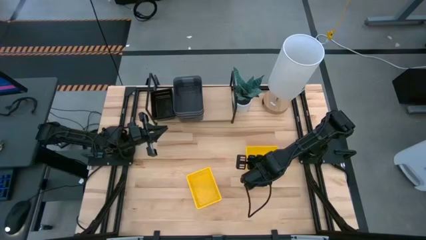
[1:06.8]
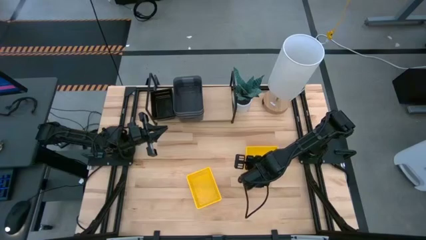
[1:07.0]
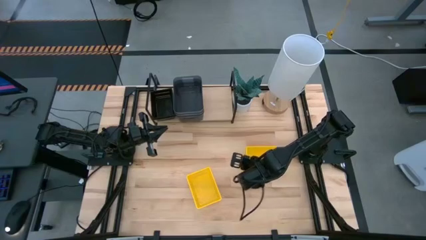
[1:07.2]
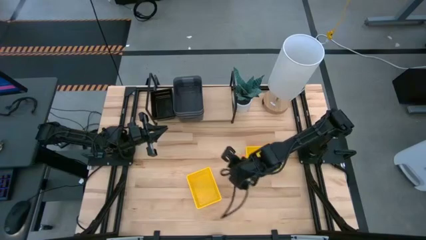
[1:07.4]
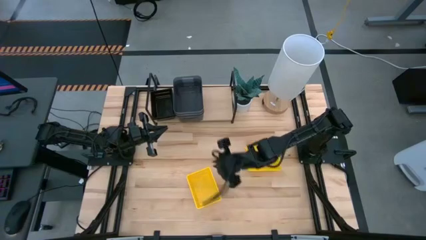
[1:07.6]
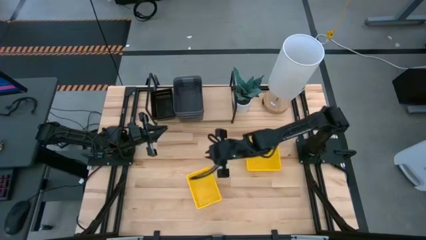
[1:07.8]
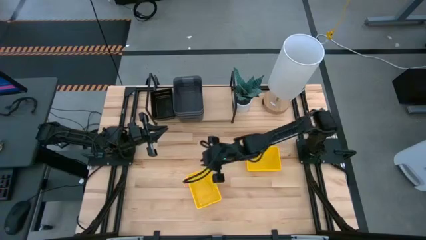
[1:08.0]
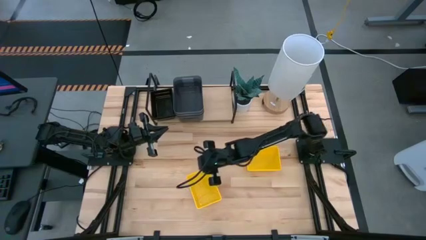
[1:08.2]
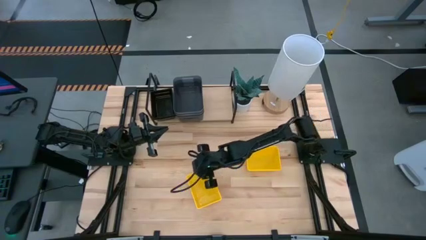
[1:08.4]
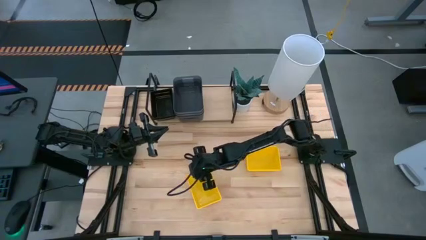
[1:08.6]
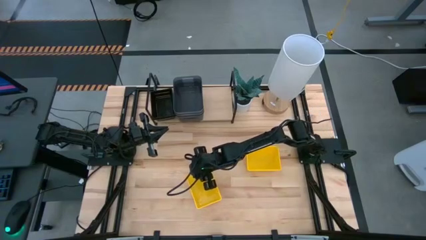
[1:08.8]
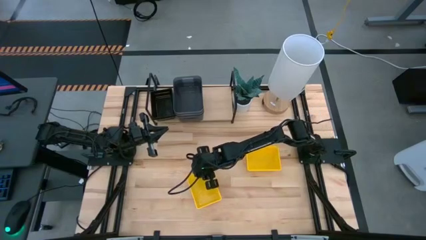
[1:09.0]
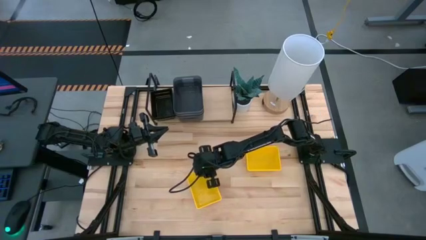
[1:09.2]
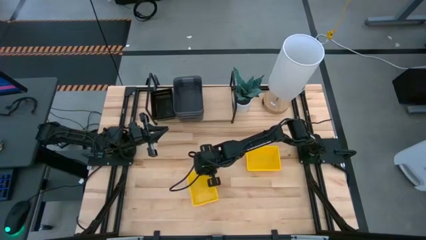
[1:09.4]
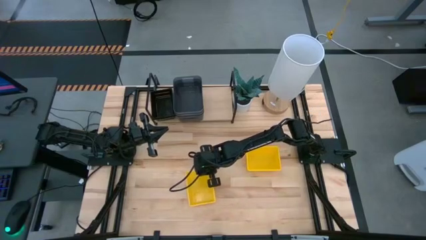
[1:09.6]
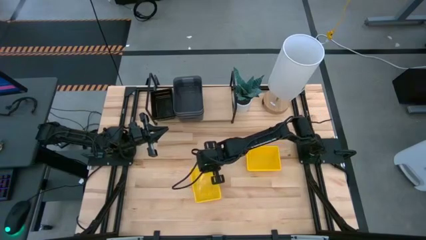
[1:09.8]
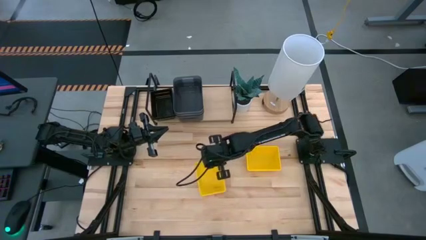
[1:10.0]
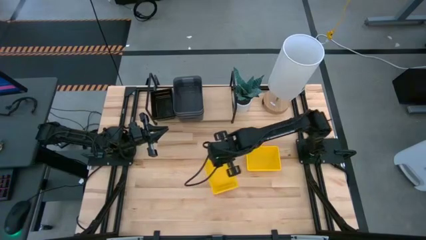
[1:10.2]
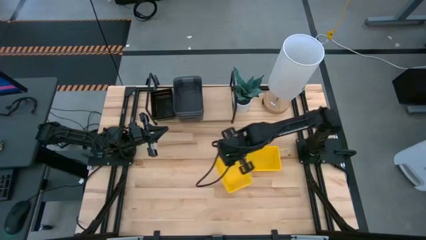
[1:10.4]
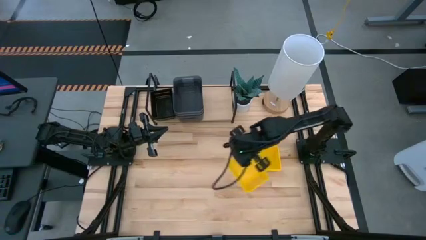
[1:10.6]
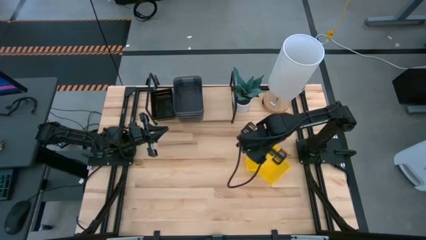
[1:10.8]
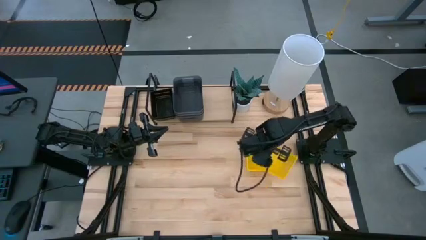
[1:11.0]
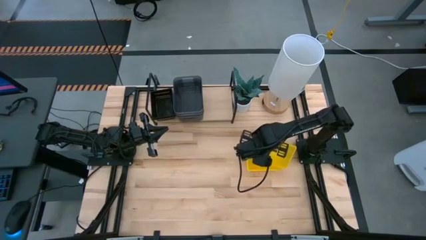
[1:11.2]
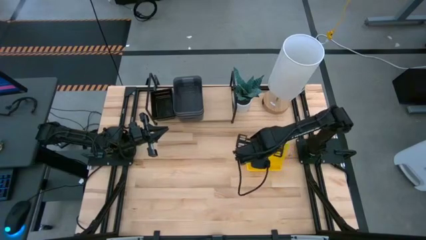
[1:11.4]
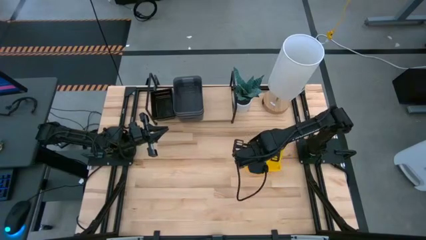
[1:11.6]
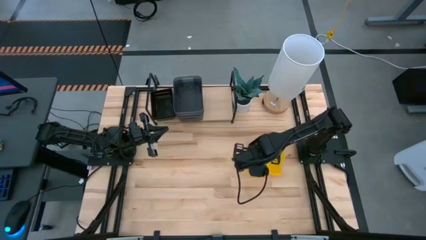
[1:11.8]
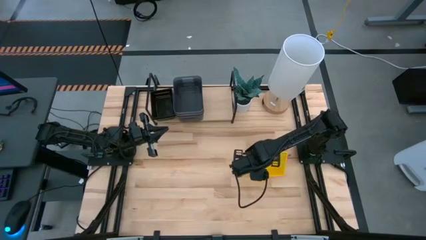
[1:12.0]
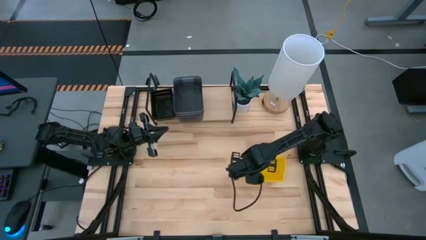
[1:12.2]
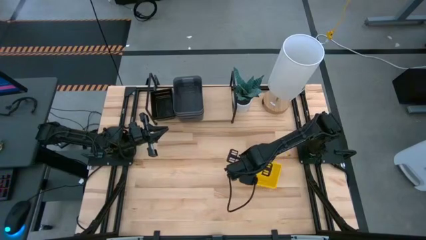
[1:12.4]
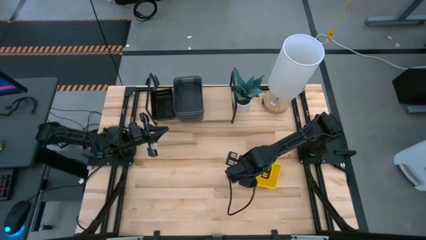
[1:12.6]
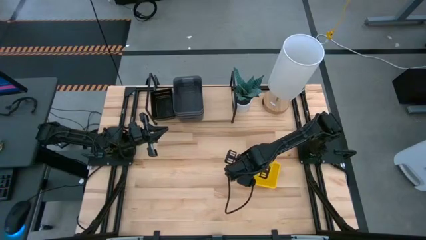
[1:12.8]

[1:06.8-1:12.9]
Task: Stack baskets on shelf by color
Stack the bottom yellow bin on the stacked yellow bins

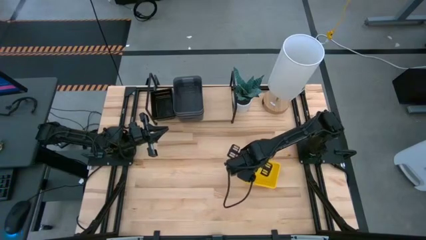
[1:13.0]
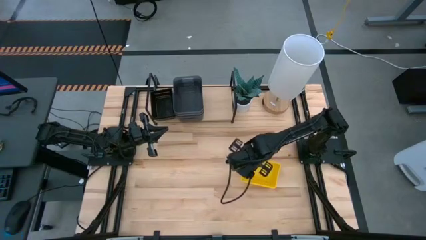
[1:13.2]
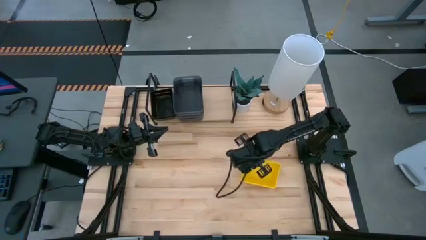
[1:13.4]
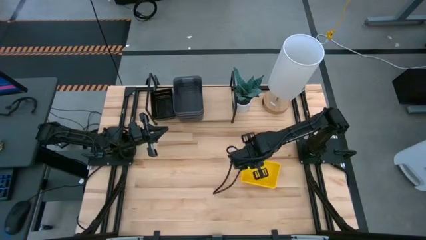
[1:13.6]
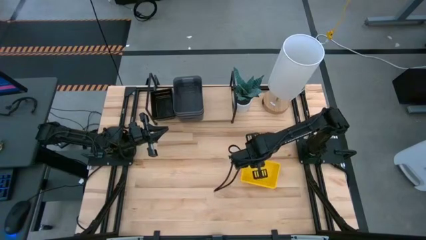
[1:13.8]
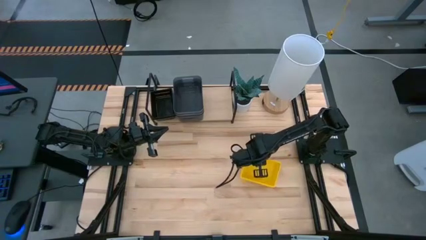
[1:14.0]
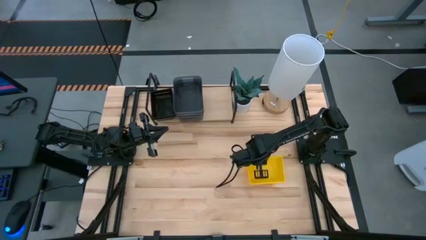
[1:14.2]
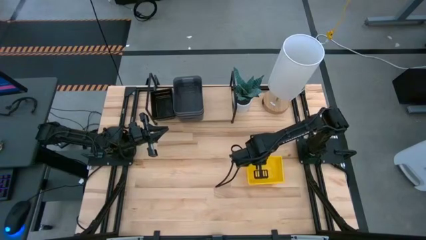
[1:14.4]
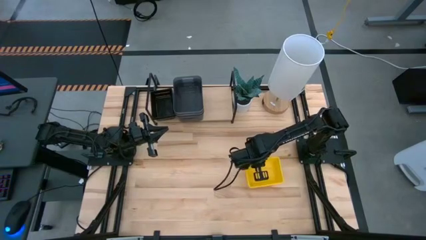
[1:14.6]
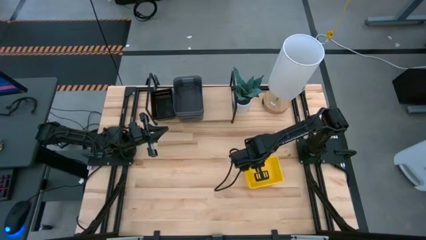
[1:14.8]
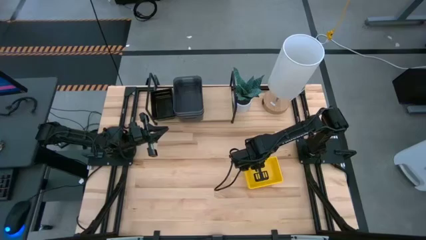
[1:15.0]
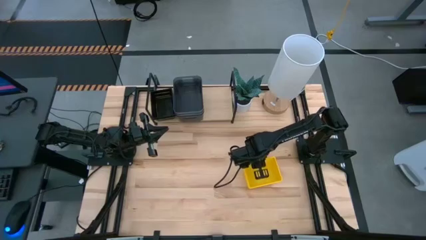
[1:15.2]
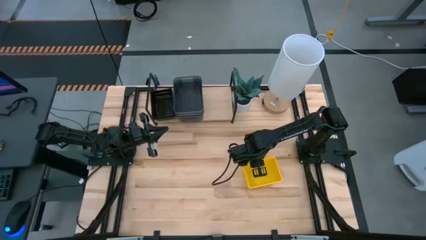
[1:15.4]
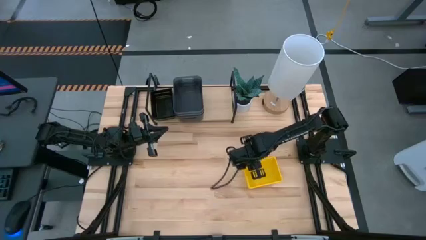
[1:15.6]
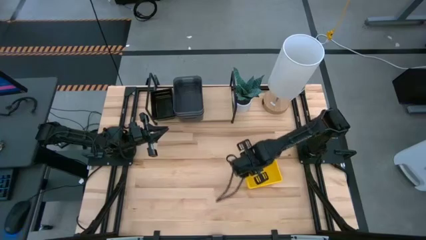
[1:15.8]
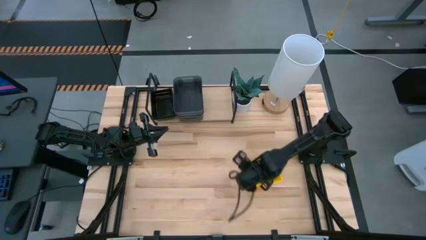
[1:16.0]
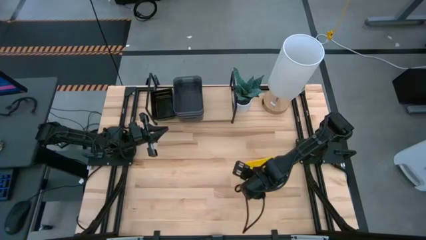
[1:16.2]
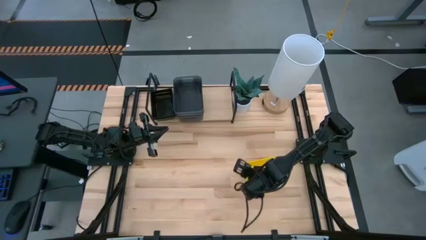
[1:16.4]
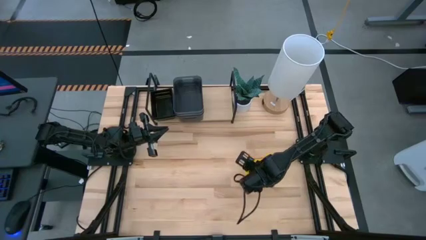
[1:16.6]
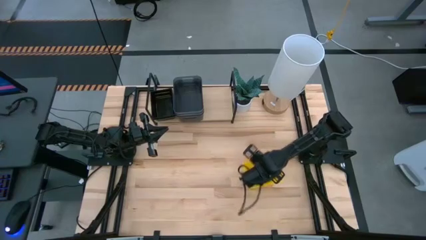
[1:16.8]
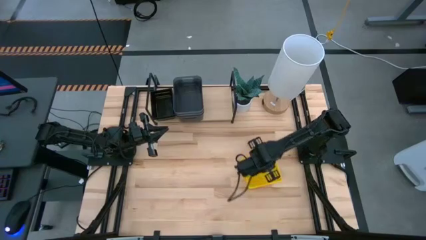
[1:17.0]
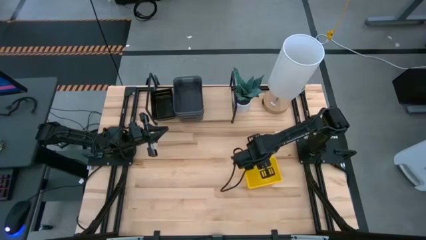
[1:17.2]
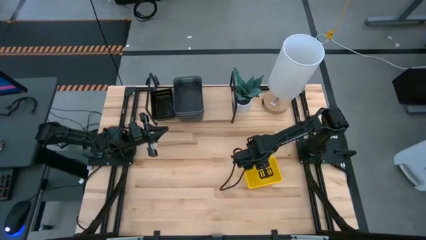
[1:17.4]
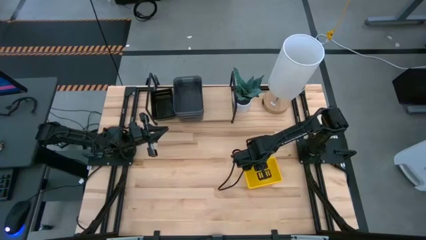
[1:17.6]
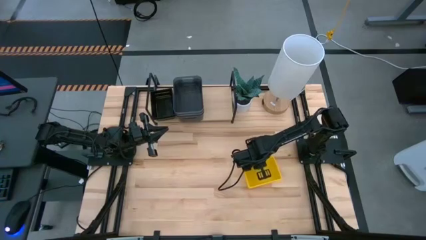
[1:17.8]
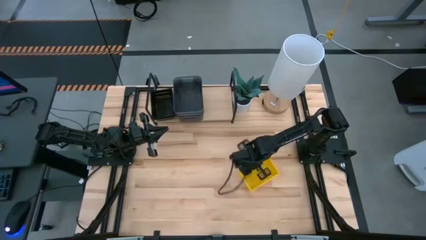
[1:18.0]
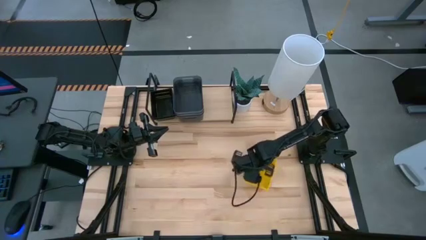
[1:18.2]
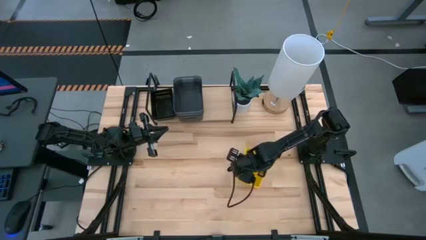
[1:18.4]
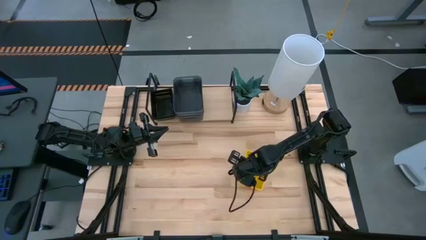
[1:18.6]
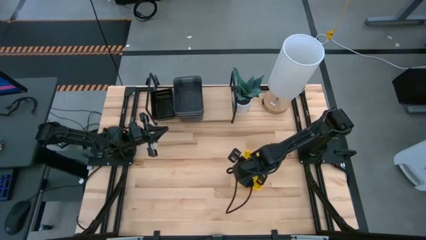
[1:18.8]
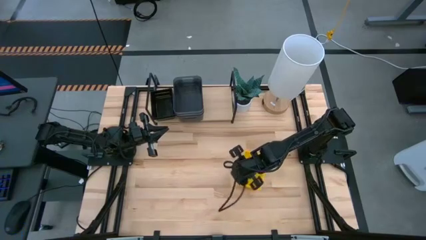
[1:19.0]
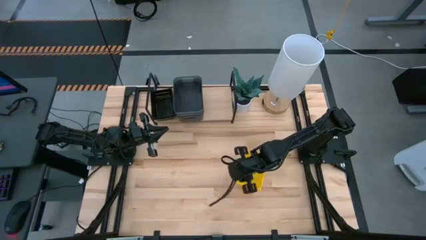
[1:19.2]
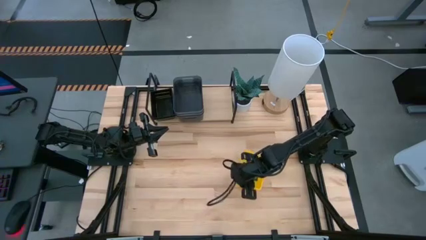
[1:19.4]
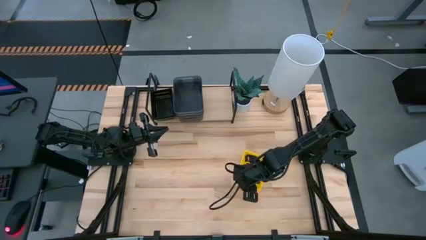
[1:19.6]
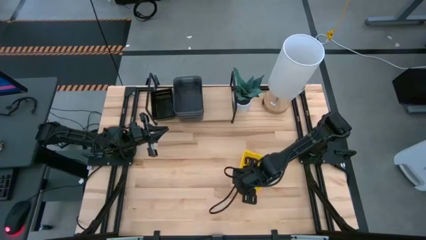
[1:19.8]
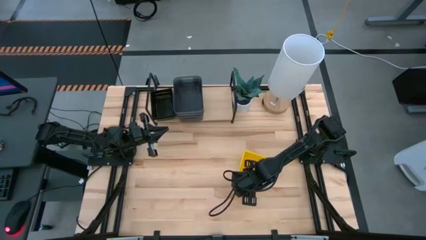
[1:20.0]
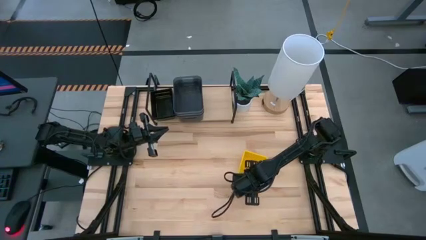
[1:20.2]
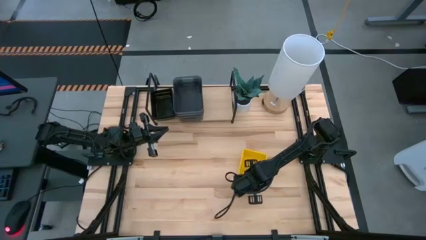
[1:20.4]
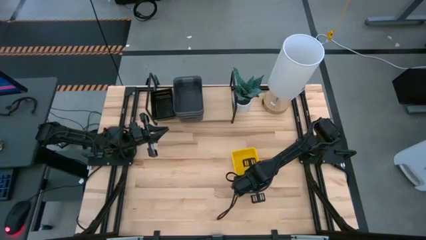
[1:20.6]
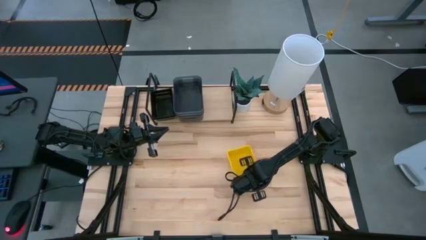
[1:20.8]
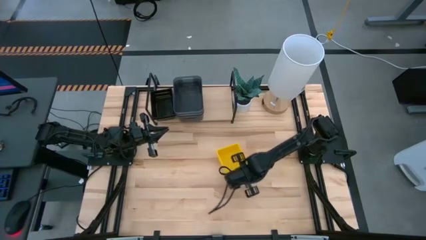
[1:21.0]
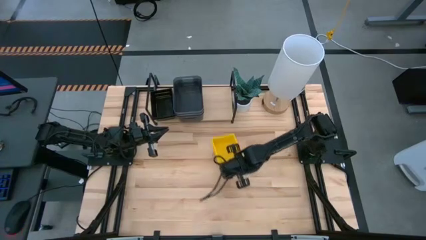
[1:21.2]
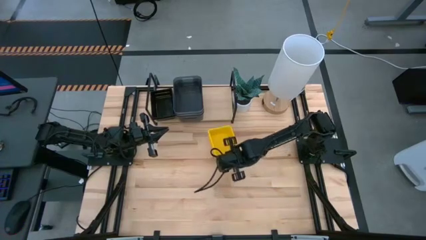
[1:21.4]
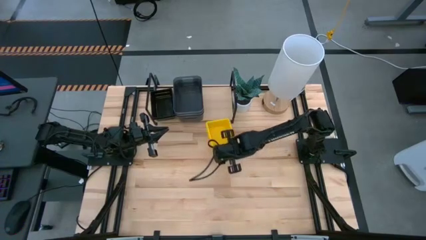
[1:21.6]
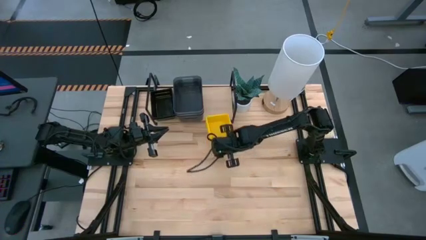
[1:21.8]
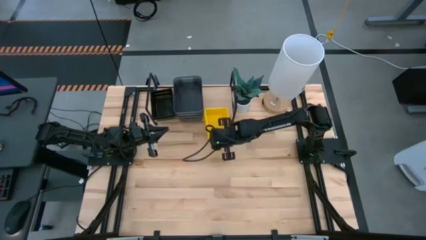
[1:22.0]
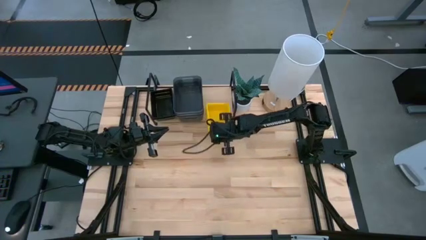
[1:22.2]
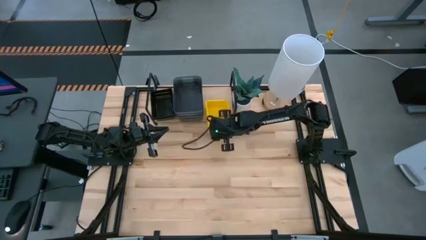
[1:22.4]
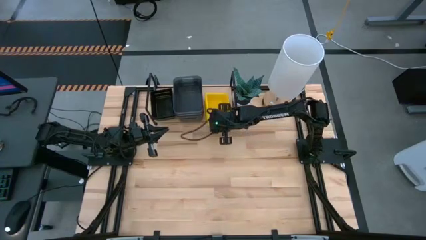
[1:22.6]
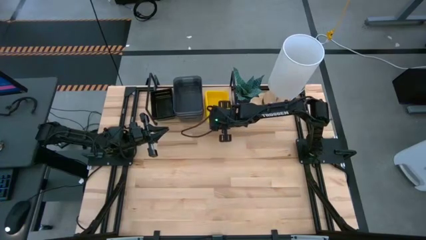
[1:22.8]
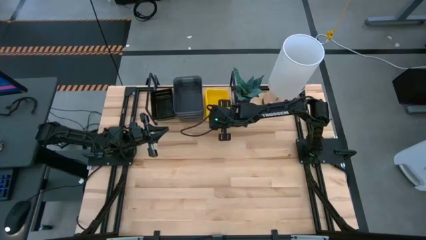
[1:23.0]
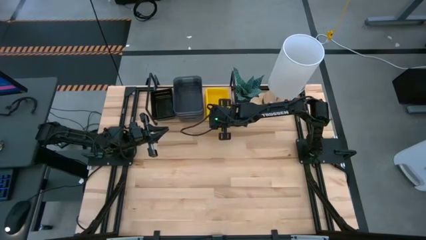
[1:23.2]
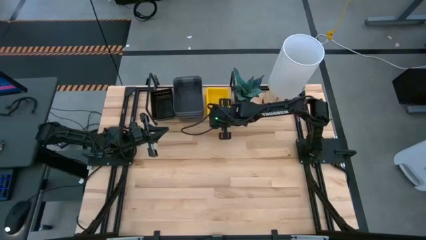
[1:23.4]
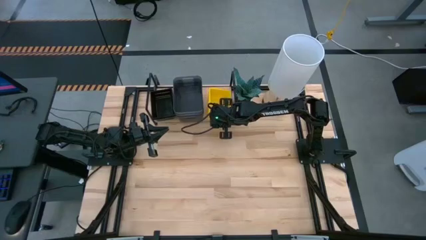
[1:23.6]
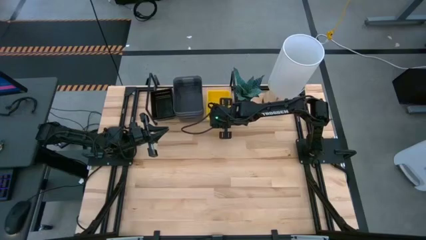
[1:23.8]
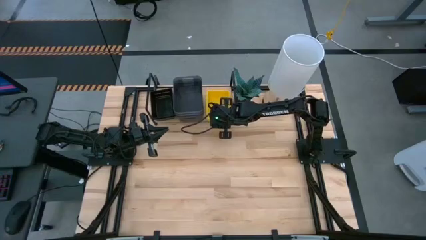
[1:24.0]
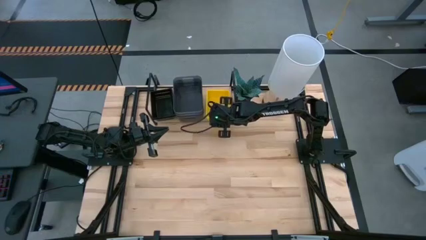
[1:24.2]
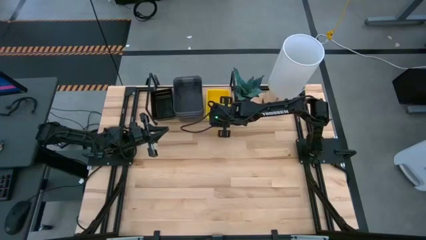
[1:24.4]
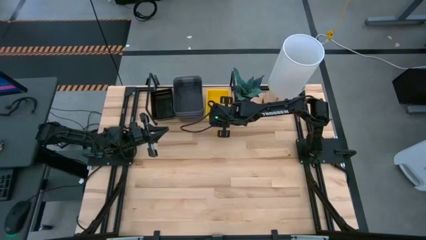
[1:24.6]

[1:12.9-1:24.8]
Put the stacked yellow bins on the shelf
